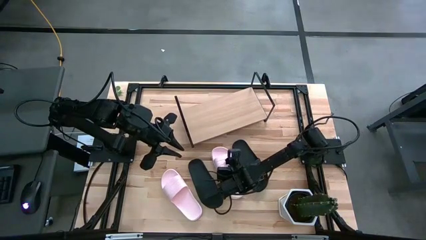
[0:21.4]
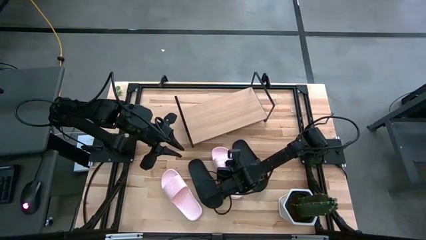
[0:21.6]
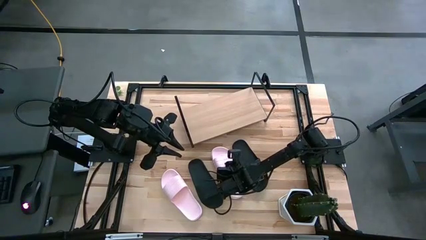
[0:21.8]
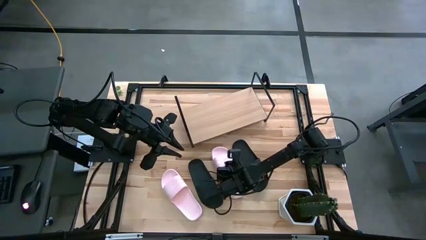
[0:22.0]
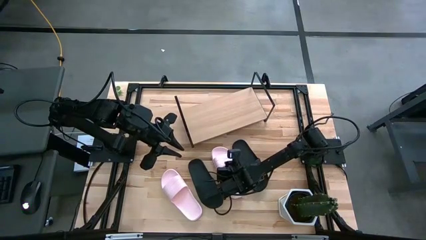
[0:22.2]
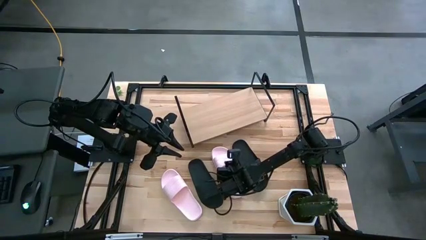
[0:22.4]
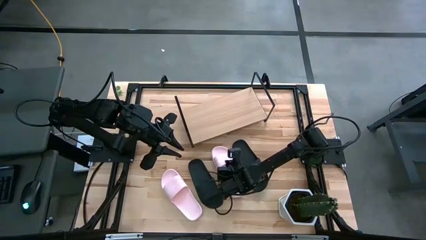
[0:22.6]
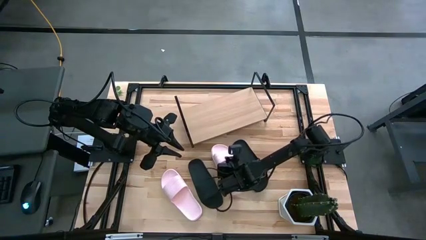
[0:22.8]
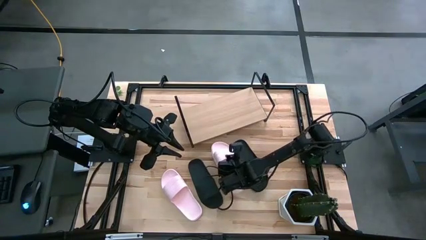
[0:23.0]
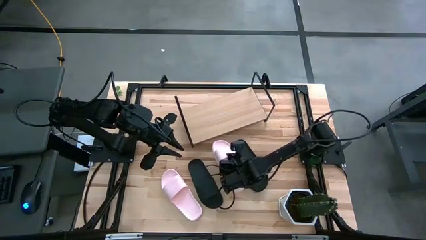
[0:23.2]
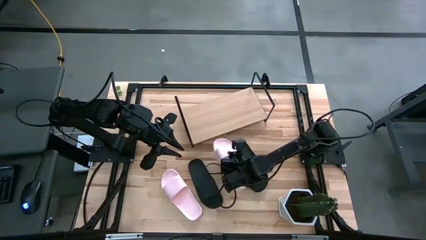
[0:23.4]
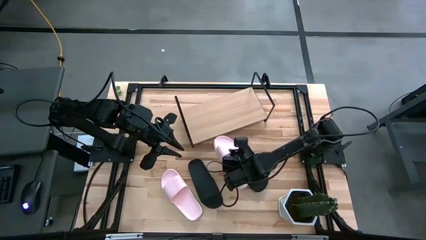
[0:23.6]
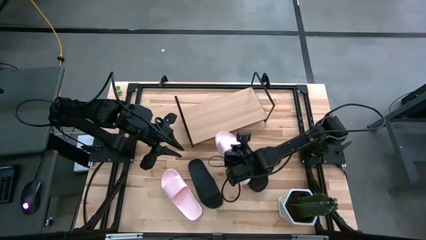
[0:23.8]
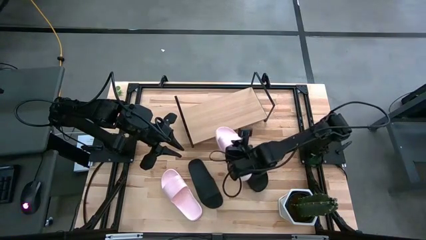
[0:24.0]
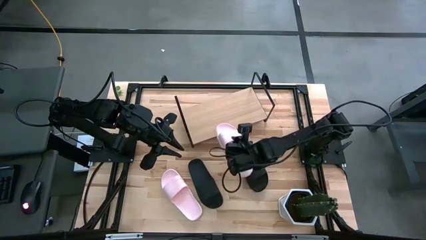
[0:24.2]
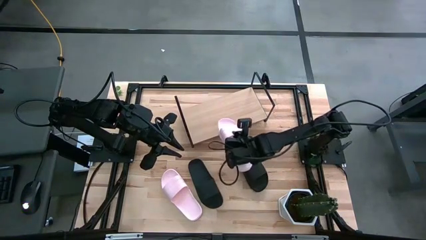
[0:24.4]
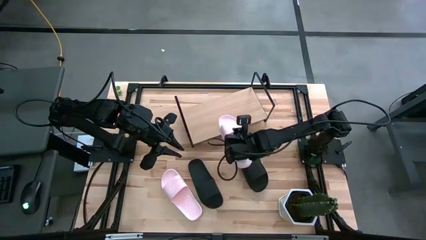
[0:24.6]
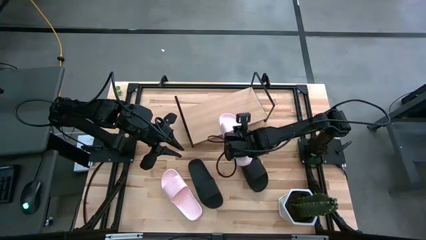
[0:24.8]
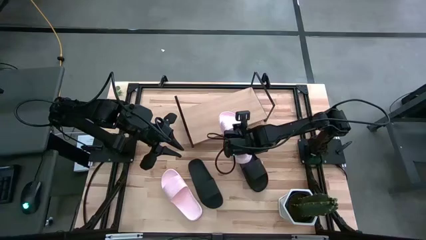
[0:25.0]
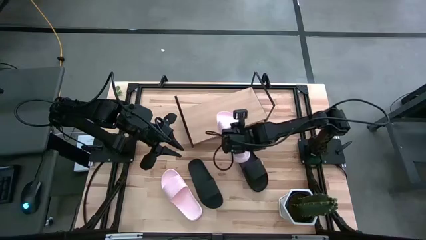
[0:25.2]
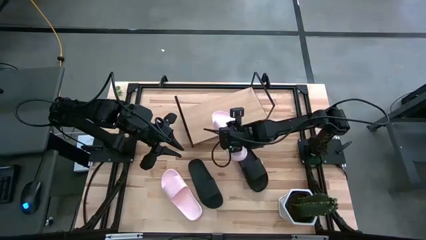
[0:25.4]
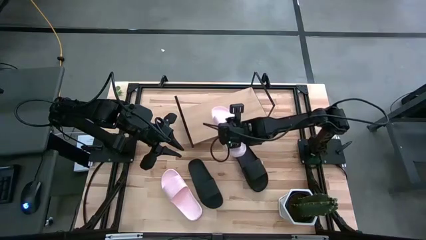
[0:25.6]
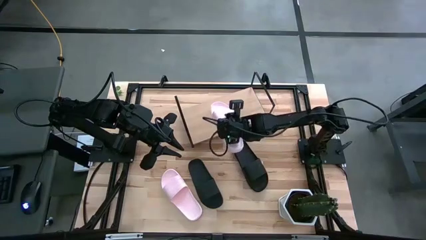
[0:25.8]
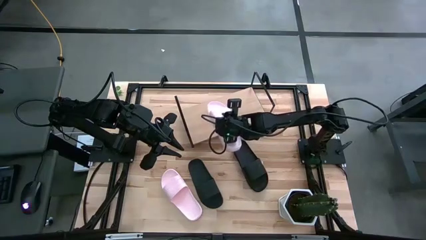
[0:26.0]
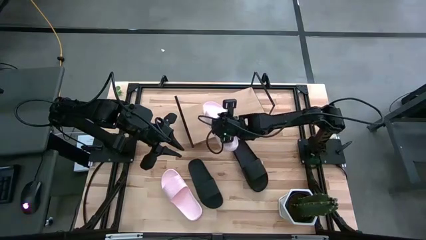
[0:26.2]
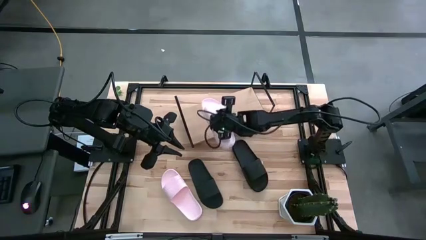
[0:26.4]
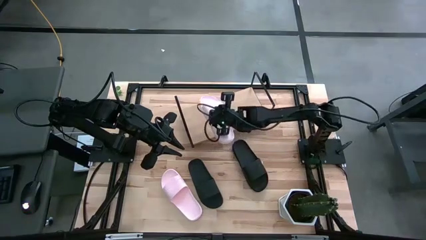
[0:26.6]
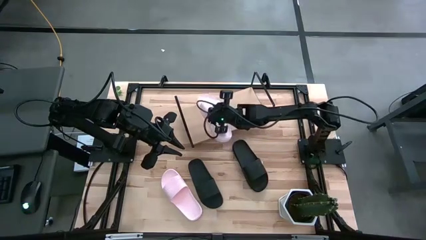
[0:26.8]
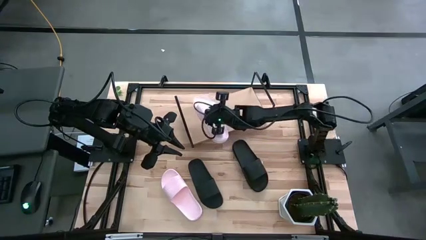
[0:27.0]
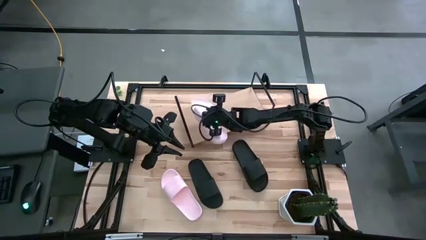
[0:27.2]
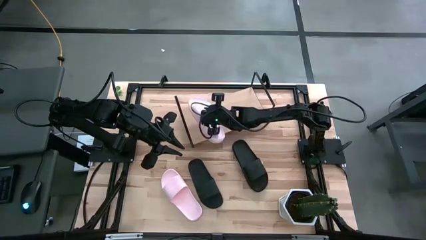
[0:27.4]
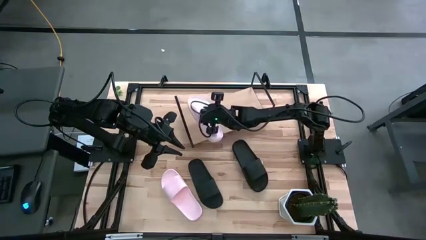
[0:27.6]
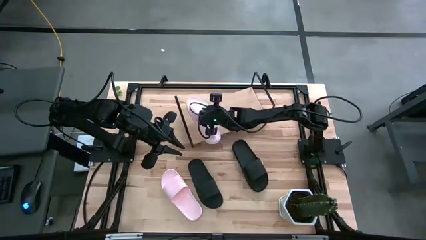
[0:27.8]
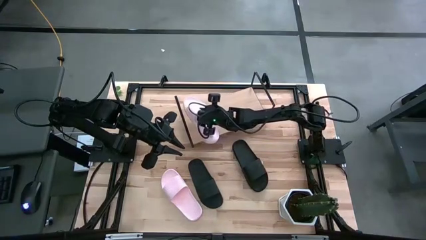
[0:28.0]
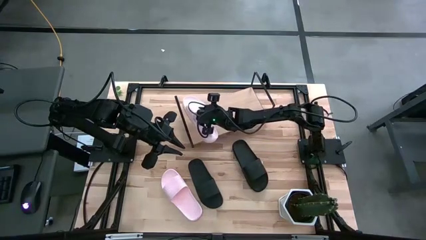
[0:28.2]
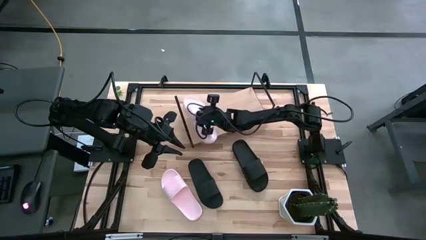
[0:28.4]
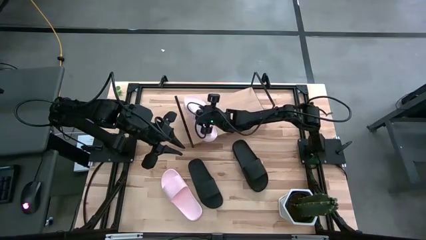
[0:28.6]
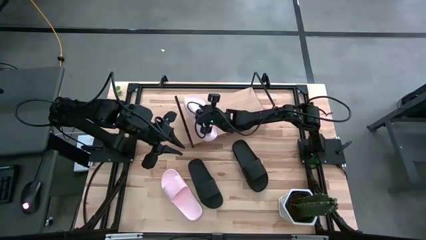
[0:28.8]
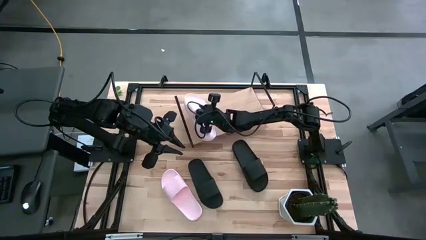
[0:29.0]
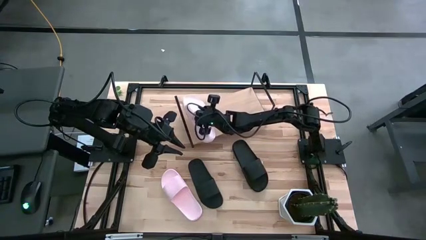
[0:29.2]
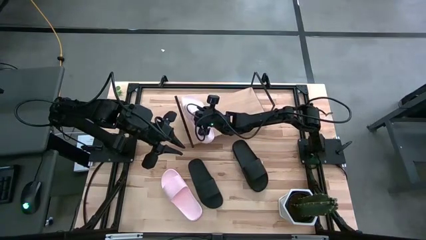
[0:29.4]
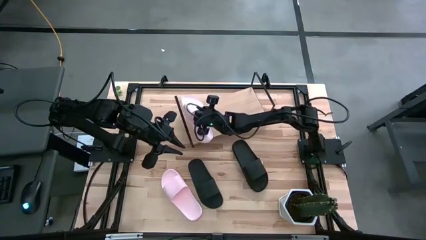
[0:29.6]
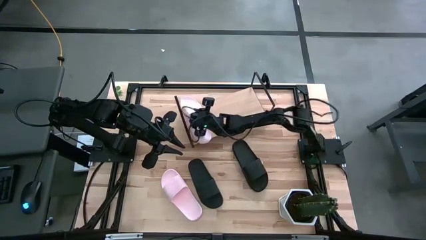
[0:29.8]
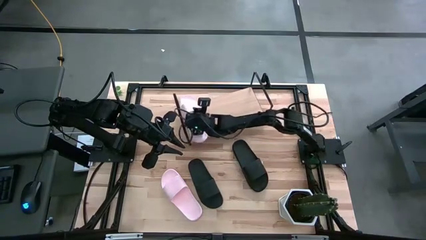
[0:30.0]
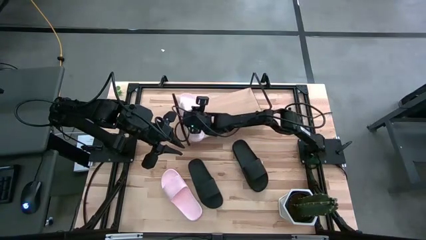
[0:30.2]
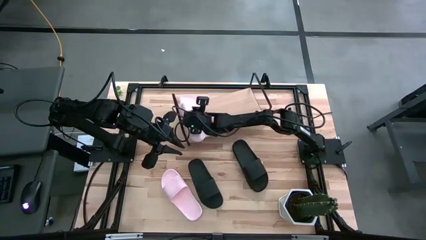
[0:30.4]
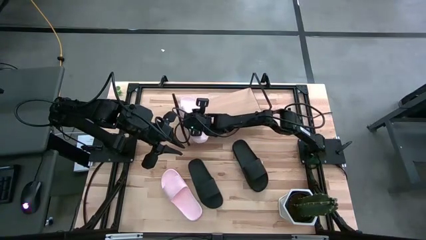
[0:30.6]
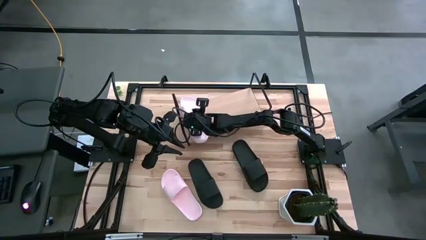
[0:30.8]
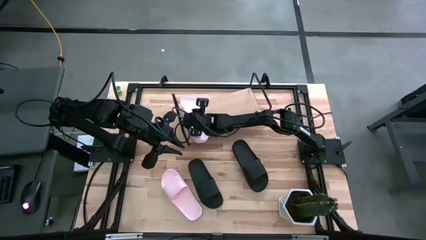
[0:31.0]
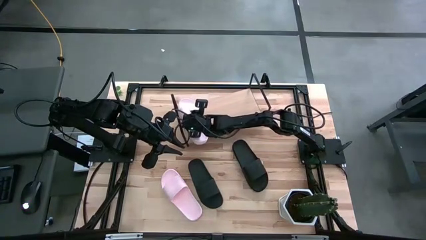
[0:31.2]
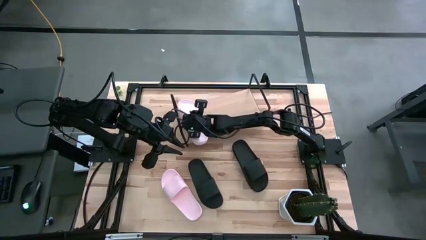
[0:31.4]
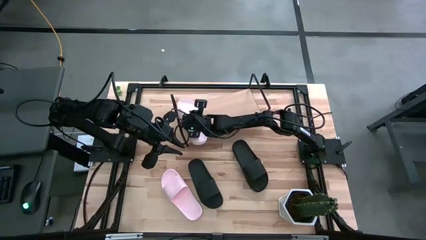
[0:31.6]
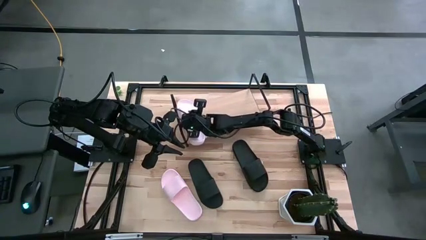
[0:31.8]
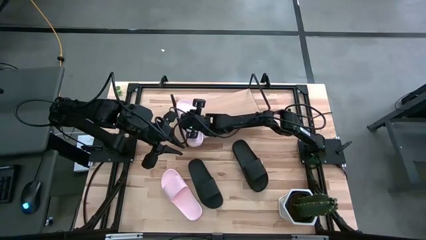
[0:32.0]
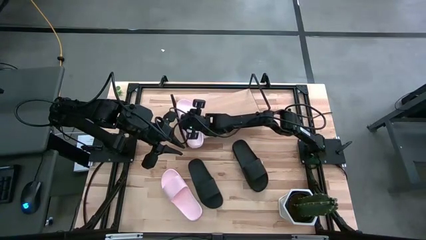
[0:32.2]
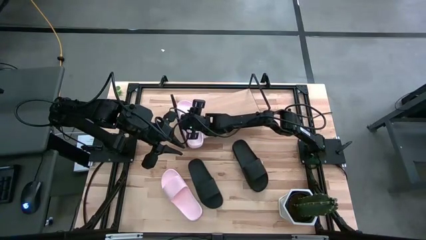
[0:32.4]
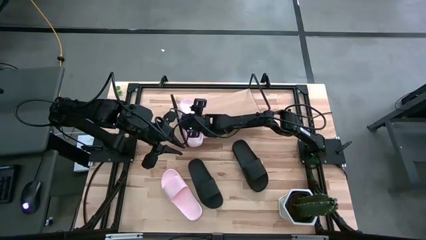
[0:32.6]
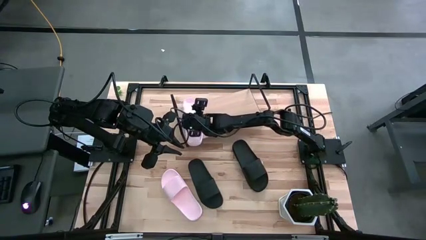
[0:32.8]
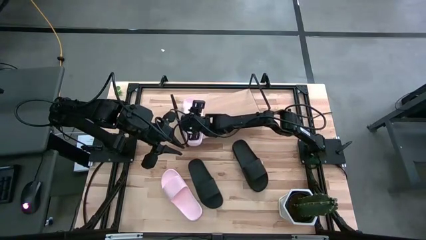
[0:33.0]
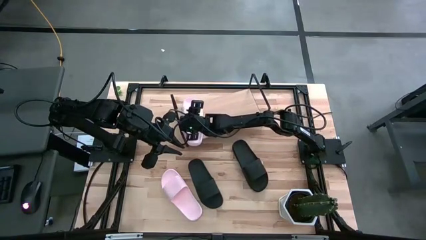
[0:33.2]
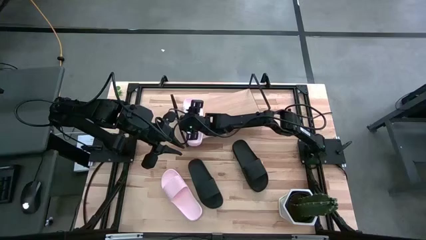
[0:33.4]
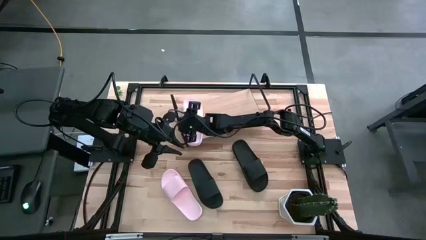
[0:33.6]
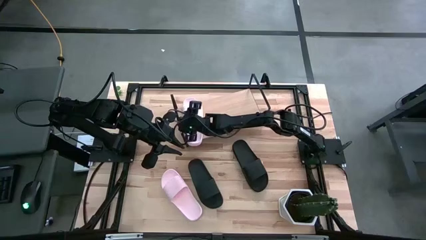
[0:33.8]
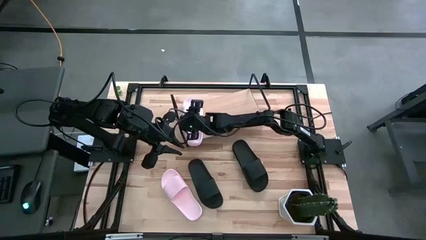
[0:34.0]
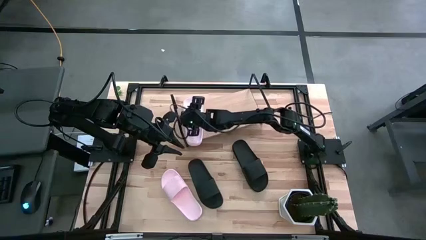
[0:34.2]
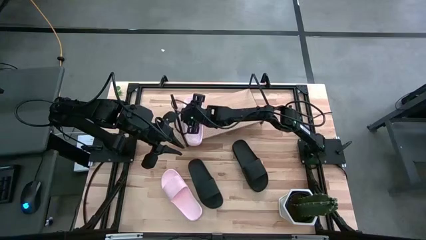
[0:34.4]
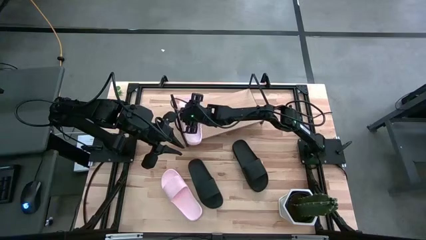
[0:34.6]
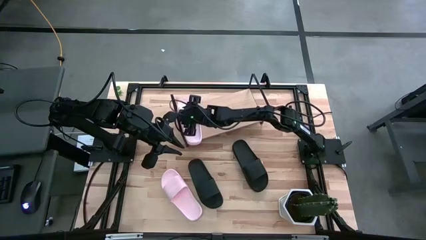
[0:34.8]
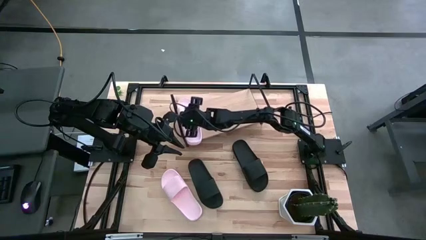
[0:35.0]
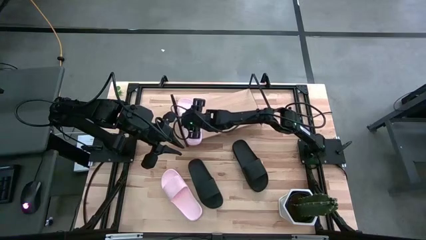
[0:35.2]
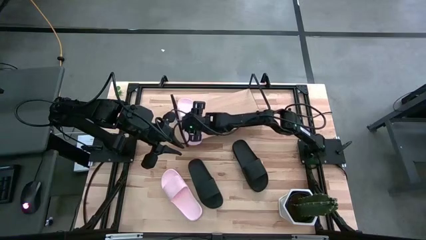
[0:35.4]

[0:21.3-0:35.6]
Task: Pick and place slides into the shelf
Put the right pink slide on the shelf
